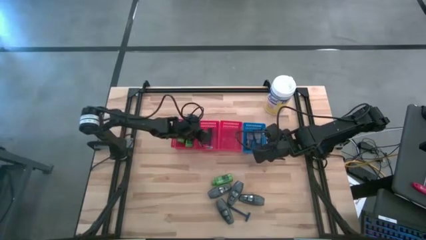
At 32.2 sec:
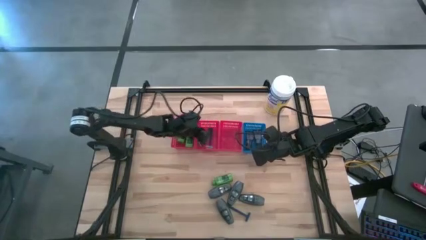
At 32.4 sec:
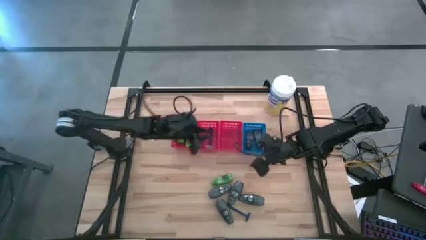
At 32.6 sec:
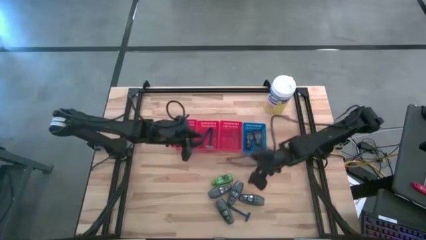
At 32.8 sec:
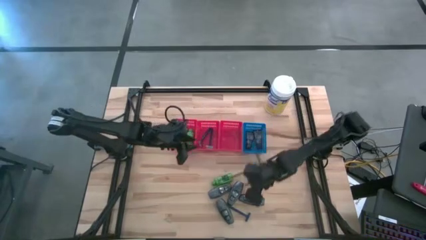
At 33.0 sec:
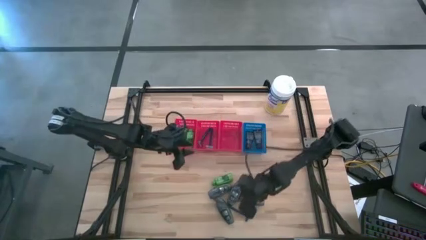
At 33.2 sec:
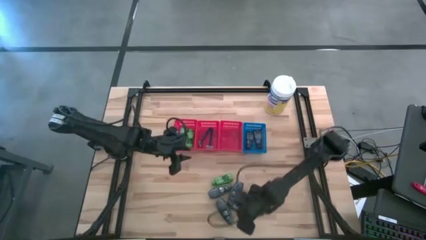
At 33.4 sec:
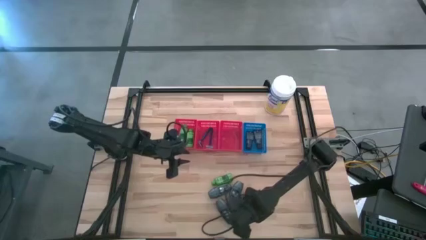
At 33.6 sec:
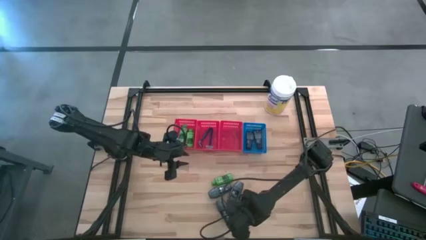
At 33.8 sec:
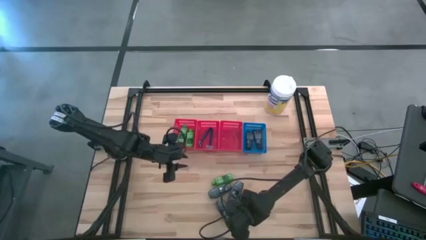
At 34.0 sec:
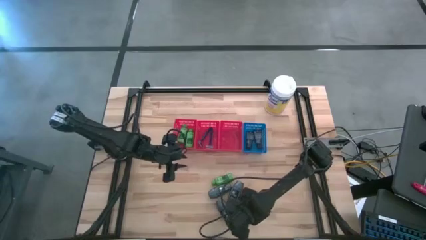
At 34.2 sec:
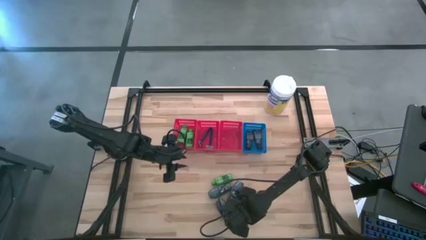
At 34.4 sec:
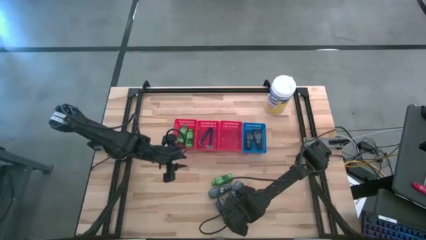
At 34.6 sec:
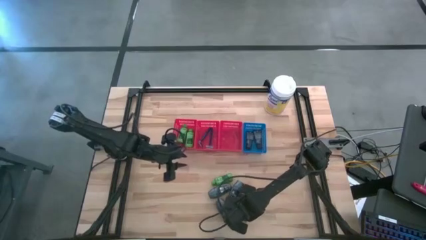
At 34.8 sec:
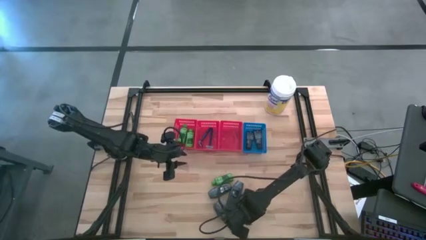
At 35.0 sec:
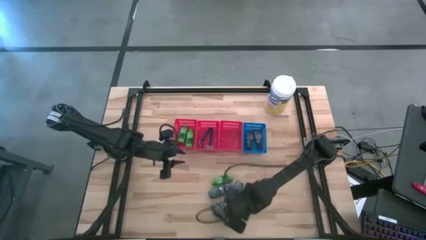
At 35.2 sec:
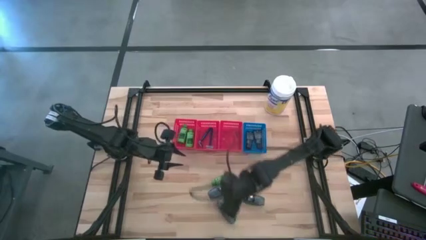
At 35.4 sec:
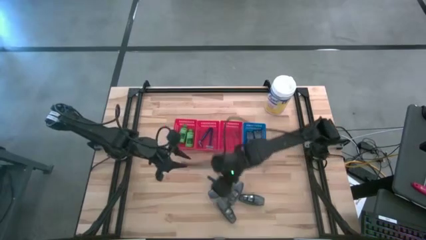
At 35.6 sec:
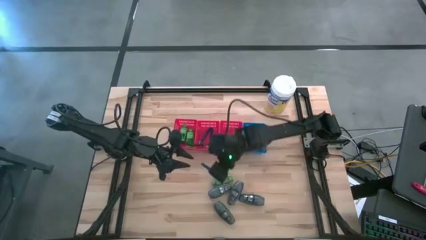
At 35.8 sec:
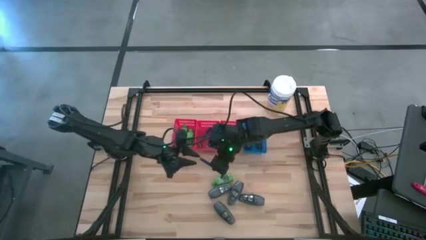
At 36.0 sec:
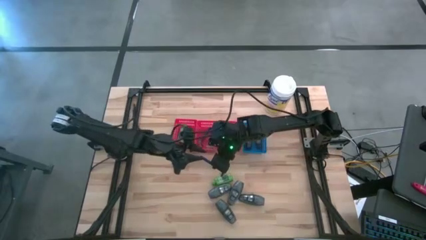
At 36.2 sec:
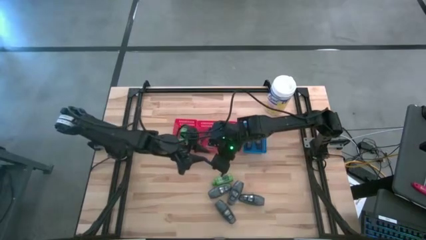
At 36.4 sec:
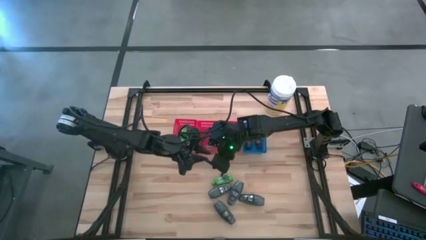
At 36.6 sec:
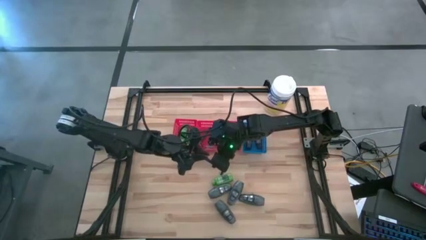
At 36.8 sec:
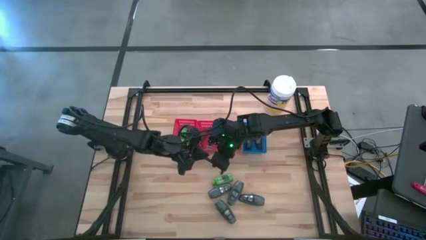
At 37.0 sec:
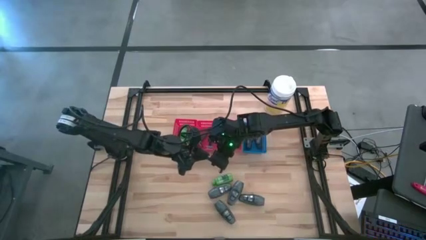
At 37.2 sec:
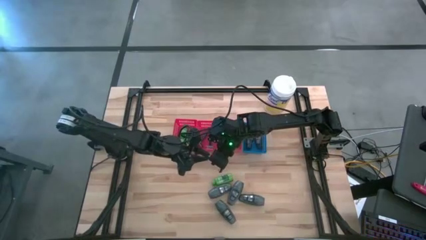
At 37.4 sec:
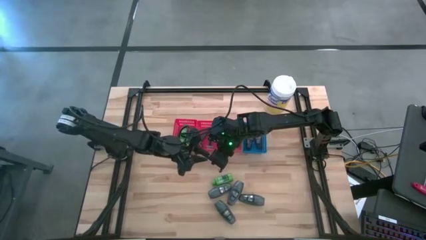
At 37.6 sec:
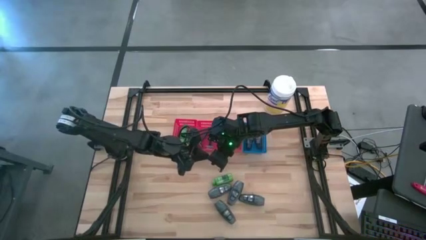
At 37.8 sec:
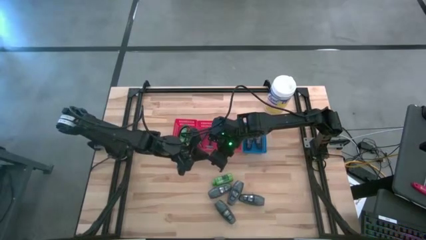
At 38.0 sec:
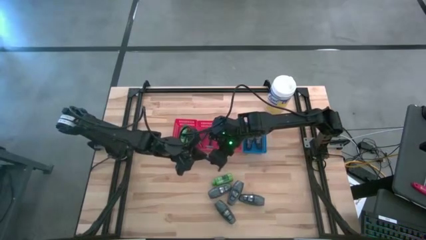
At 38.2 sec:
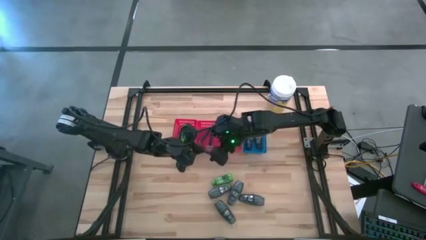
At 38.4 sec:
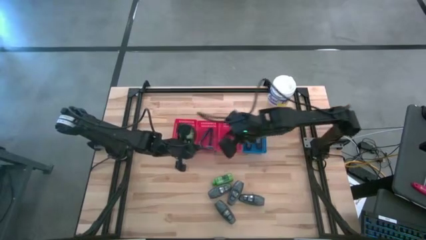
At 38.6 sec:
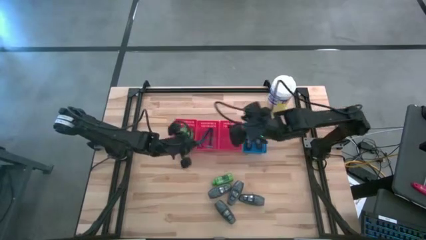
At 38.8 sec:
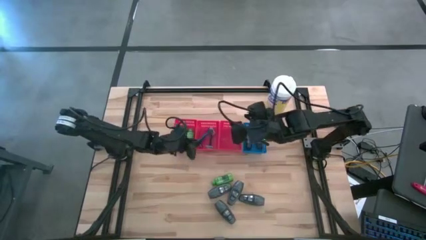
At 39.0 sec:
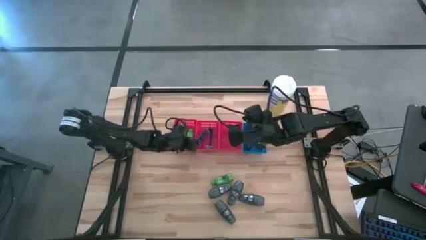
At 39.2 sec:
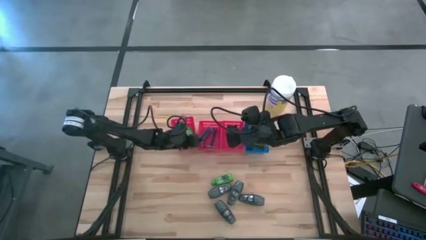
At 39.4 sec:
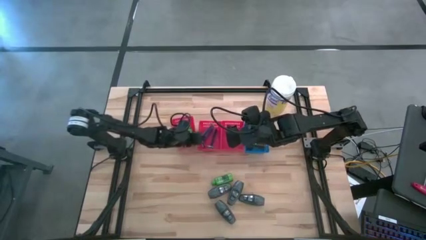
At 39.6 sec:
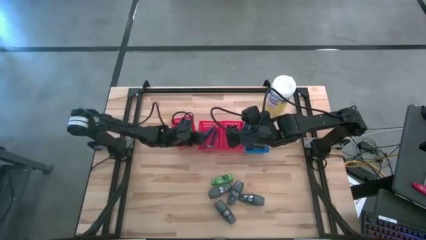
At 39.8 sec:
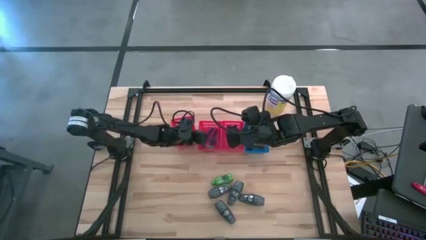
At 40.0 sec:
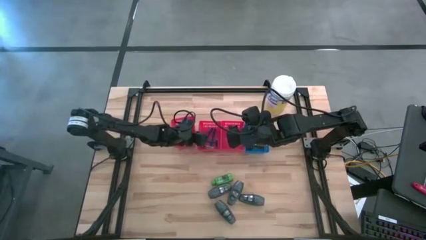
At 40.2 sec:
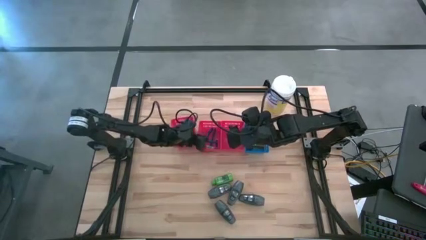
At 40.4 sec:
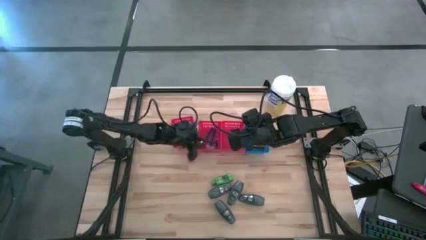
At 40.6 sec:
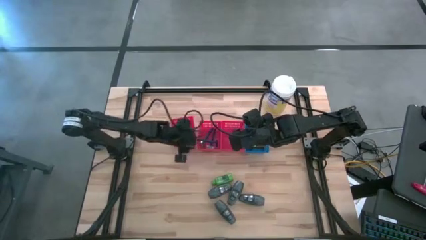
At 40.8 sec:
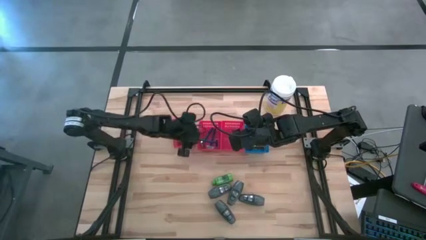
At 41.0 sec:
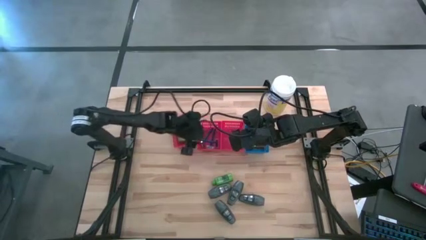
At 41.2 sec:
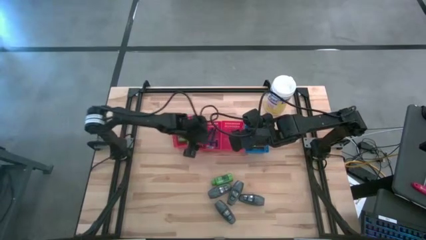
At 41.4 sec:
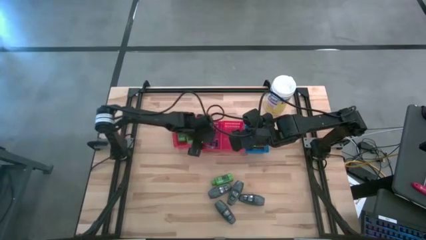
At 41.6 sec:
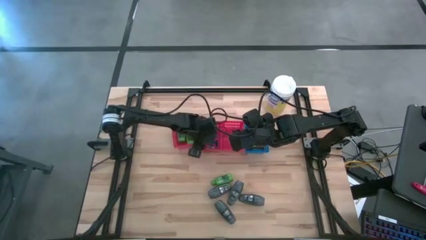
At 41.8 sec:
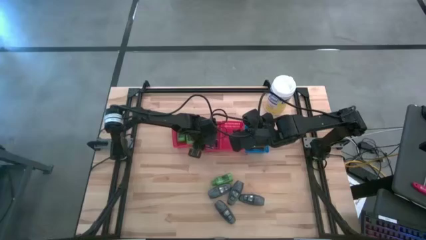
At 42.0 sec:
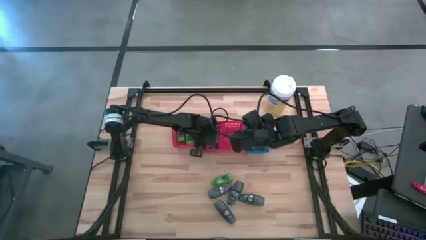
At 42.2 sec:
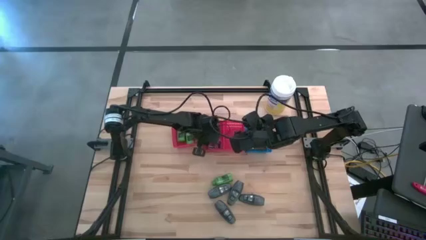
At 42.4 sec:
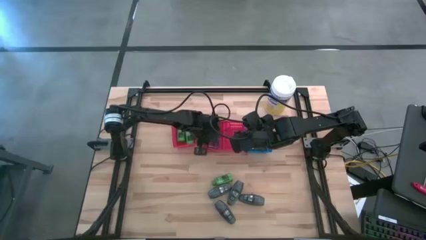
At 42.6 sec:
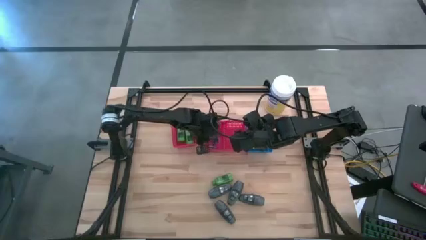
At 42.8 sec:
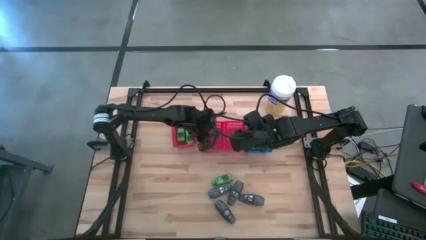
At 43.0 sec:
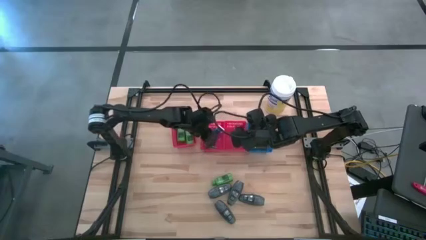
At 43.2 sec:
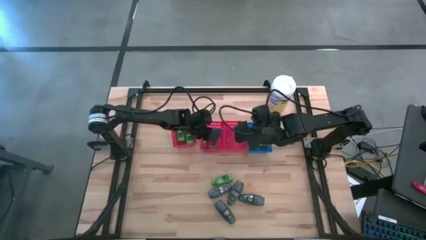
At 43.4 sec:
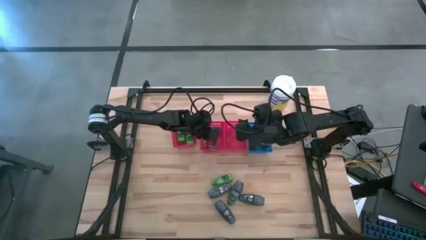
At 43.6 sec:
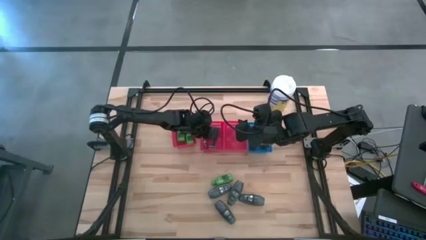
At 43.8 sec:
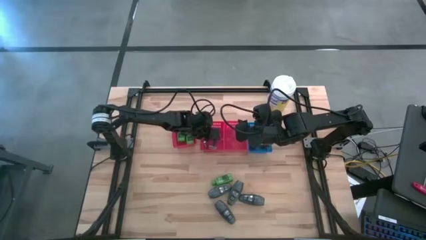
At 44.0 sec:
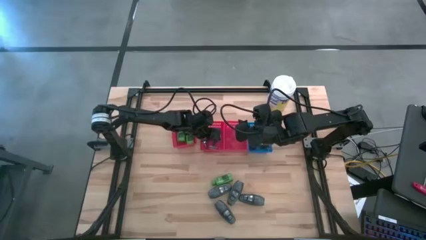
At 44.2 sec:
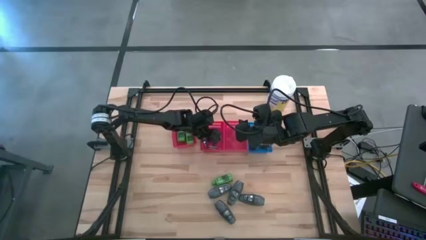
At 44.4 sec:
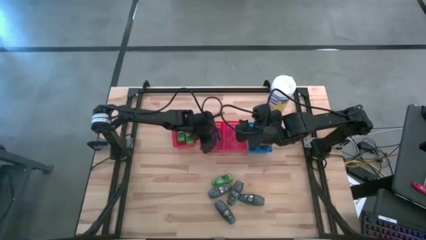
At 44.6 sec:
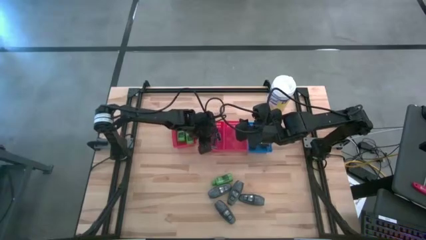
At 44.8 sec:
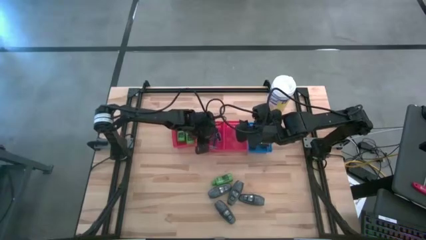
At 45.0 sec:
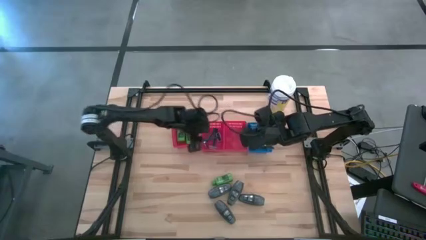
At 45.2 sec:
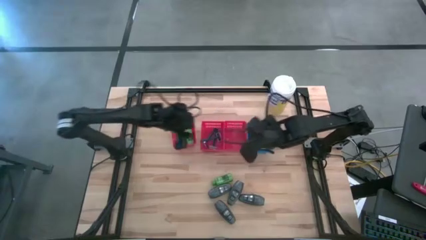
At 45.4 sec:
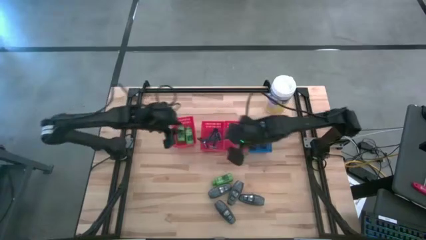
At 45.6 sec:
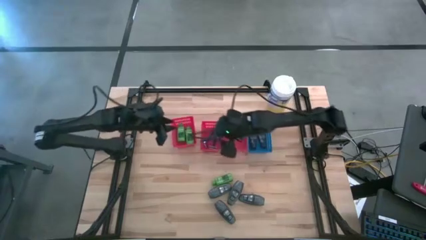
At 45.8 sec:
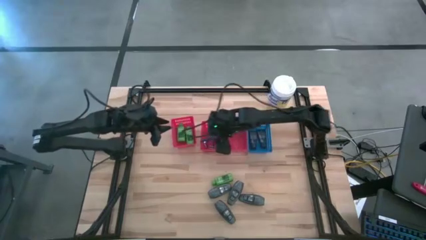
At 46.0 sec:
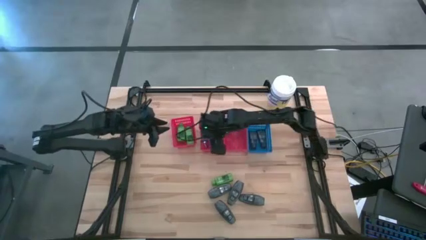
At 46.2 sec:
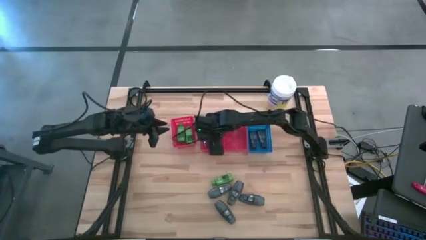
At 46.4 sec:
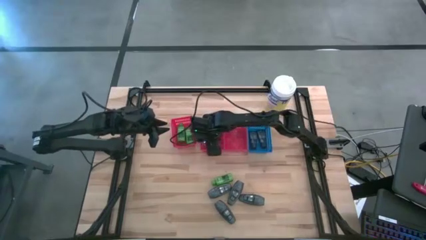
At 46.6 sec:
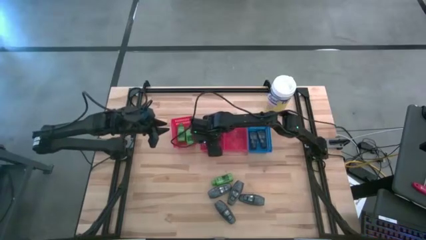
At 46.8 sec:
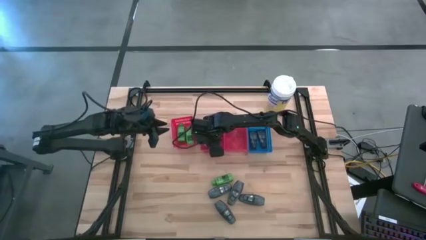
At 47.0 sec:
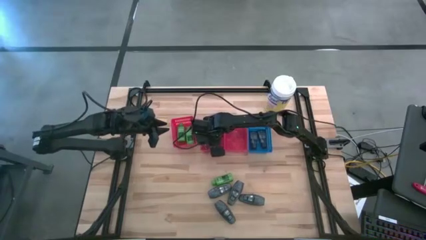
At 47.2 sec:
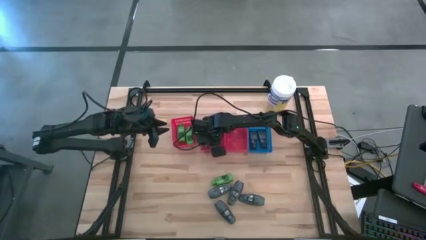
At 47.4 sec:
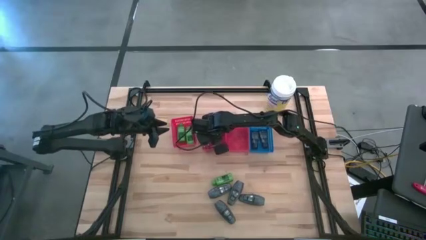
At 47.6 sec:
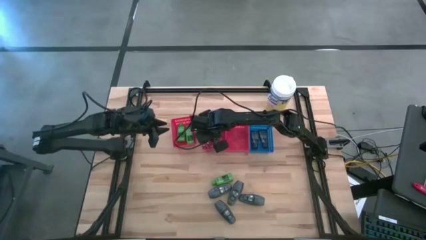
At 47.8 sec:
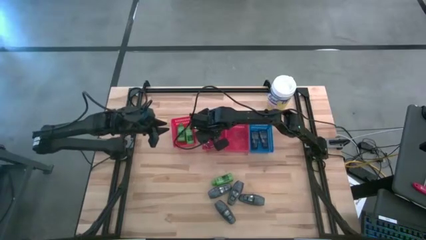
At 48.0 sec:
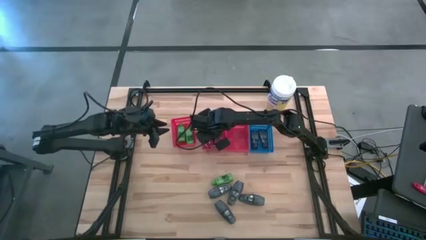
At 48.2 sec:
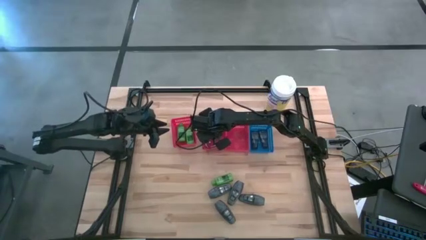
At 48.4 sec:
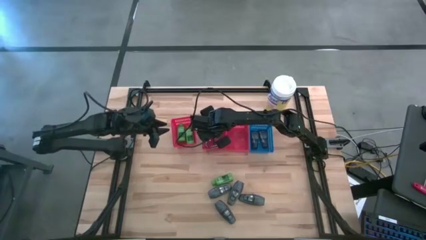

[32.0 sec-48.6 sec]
Task: Pick & Place Travel size toiletries
Put the blue razor into the middle red bin
